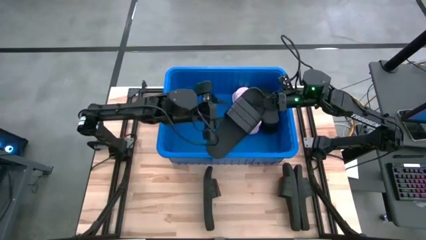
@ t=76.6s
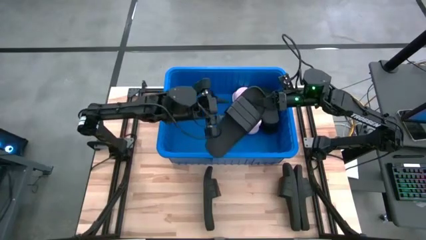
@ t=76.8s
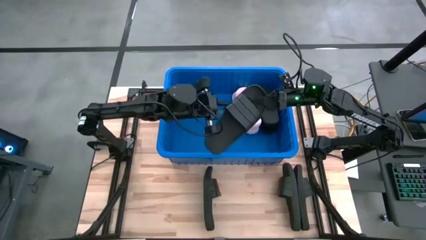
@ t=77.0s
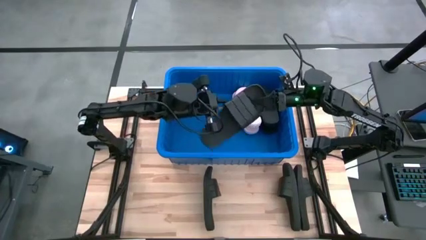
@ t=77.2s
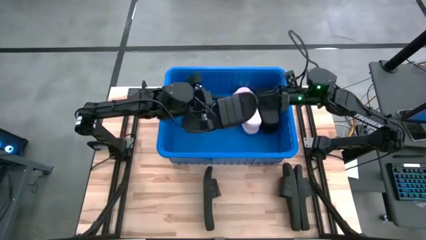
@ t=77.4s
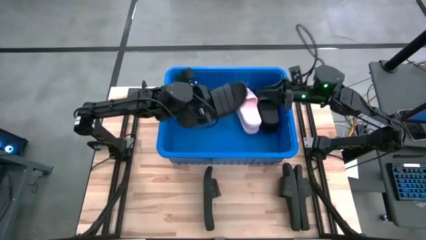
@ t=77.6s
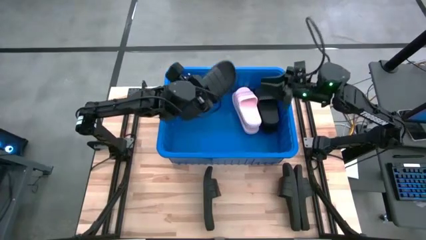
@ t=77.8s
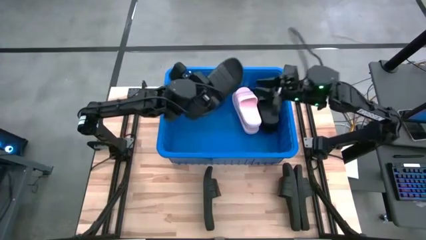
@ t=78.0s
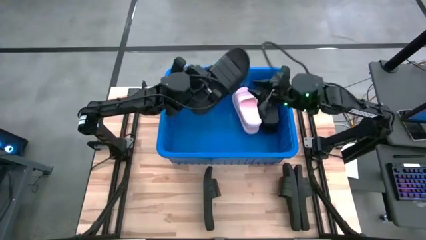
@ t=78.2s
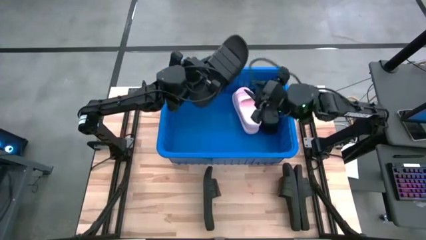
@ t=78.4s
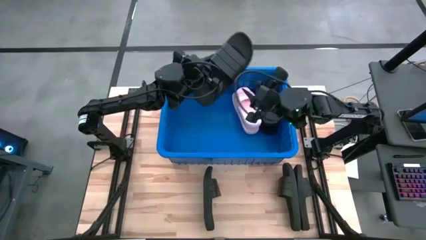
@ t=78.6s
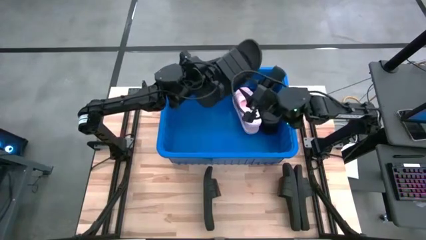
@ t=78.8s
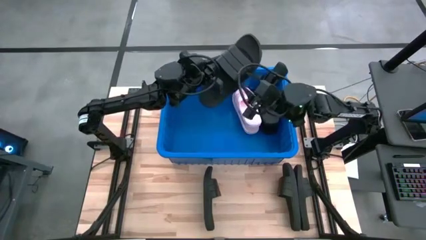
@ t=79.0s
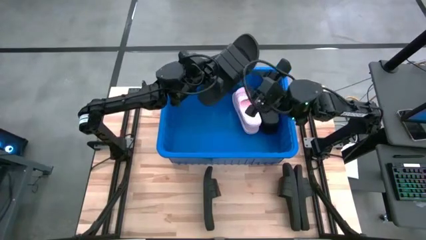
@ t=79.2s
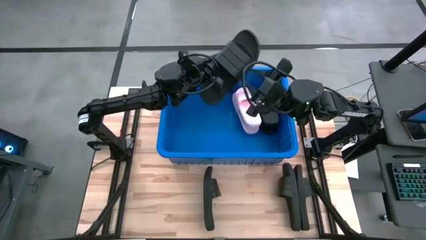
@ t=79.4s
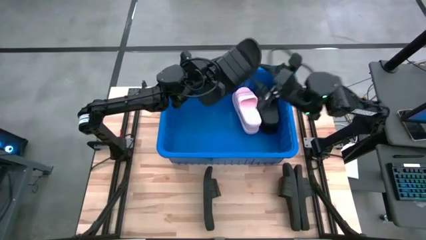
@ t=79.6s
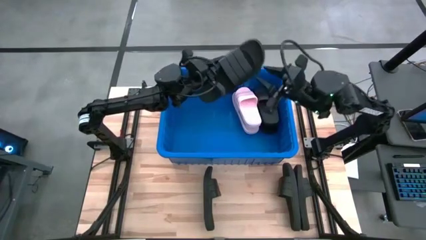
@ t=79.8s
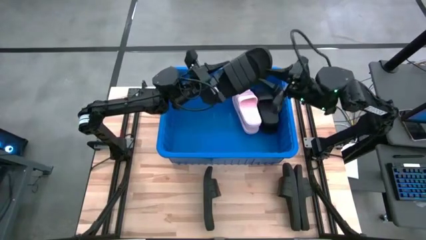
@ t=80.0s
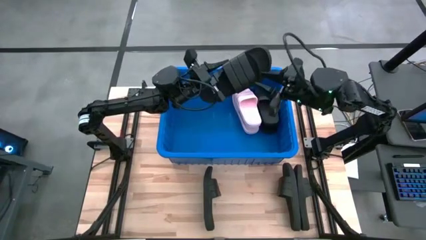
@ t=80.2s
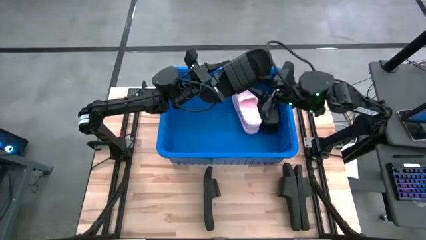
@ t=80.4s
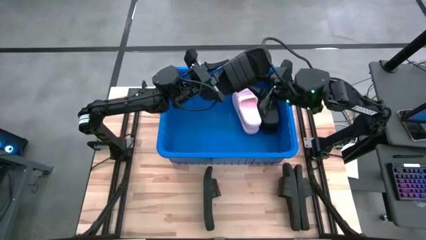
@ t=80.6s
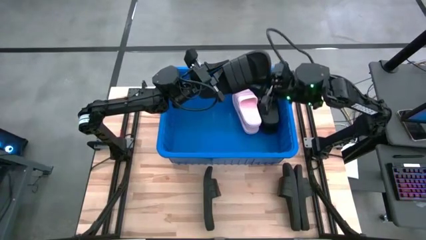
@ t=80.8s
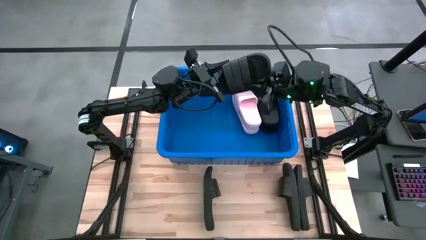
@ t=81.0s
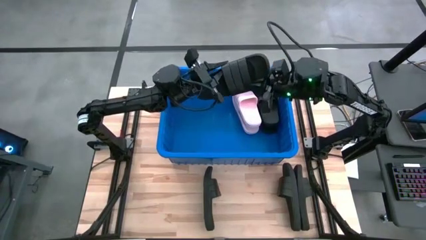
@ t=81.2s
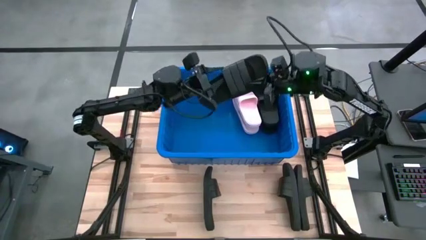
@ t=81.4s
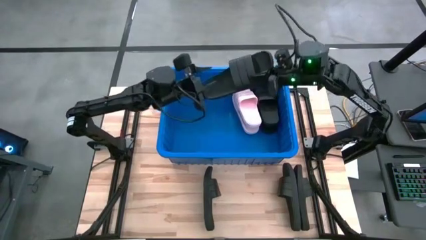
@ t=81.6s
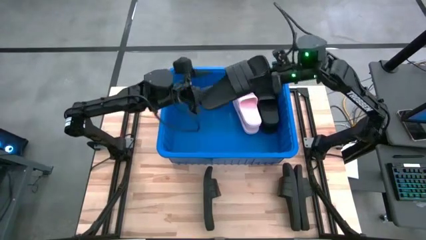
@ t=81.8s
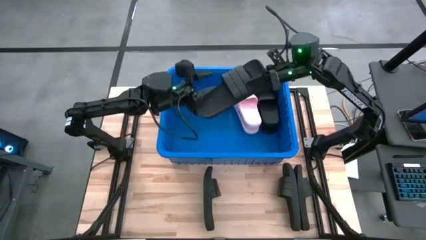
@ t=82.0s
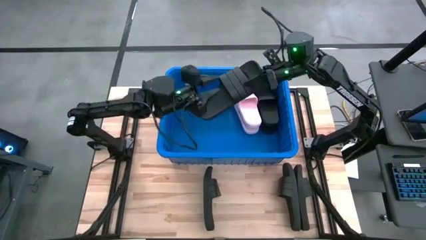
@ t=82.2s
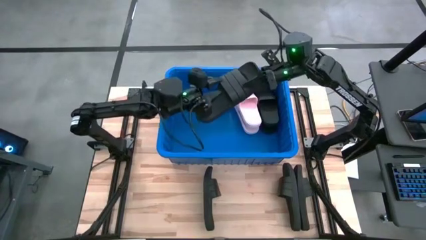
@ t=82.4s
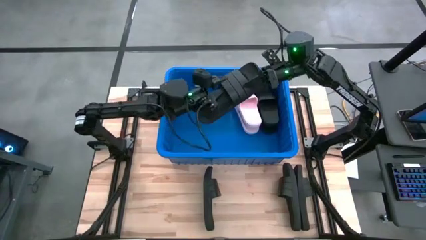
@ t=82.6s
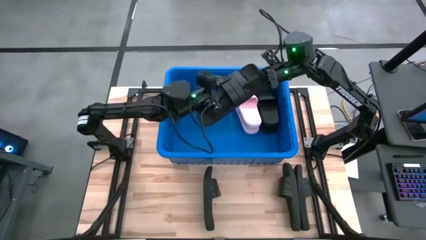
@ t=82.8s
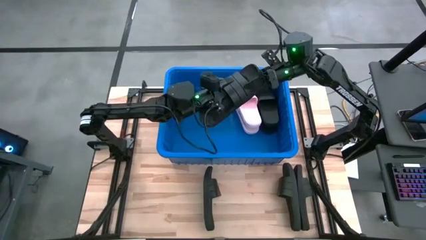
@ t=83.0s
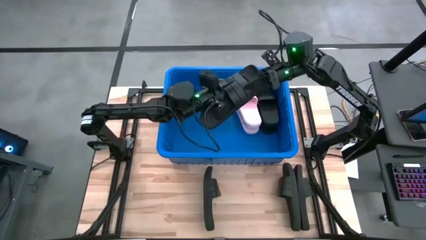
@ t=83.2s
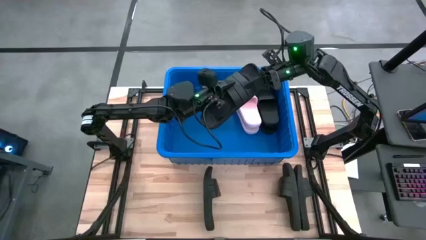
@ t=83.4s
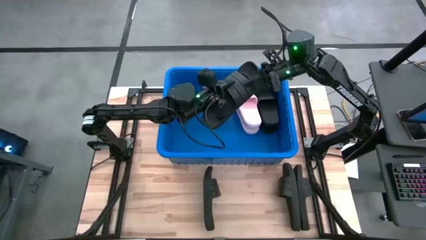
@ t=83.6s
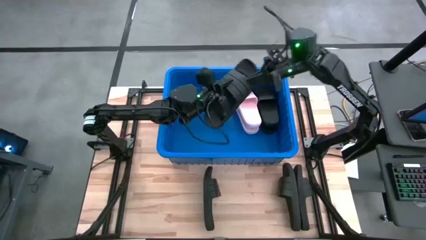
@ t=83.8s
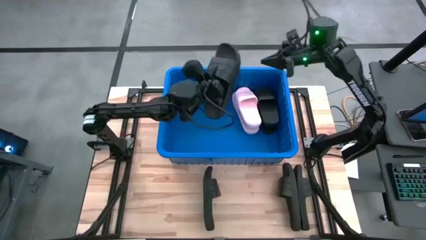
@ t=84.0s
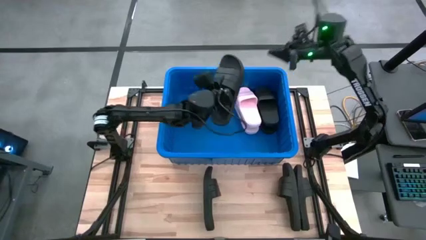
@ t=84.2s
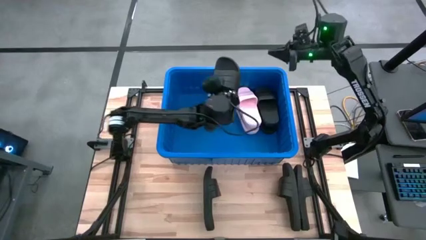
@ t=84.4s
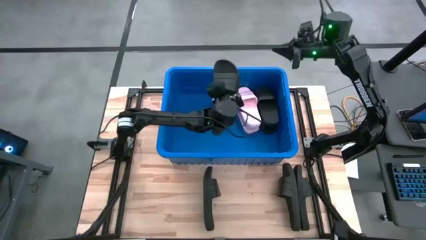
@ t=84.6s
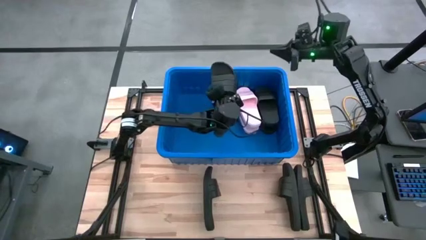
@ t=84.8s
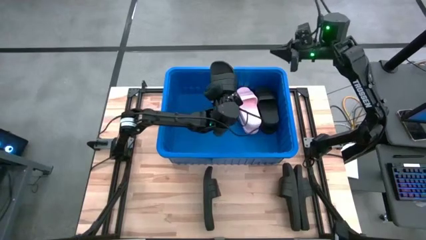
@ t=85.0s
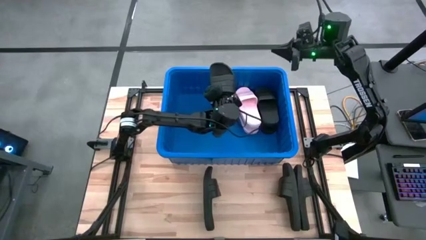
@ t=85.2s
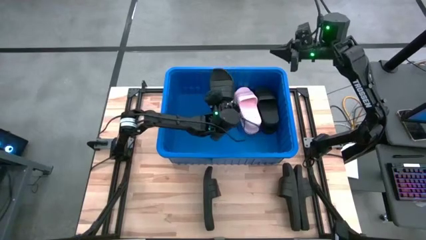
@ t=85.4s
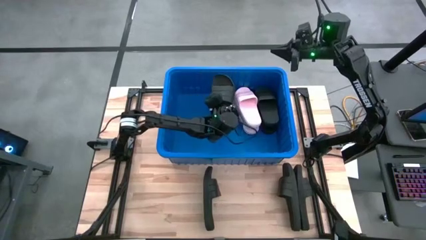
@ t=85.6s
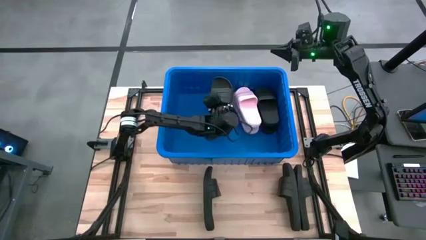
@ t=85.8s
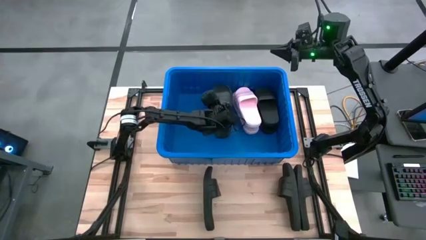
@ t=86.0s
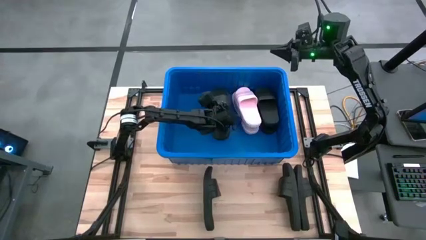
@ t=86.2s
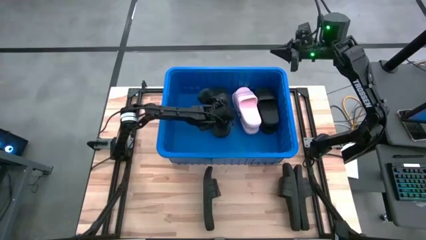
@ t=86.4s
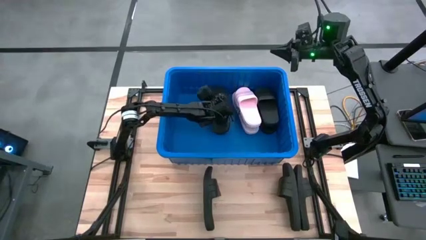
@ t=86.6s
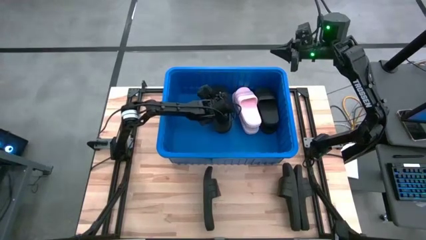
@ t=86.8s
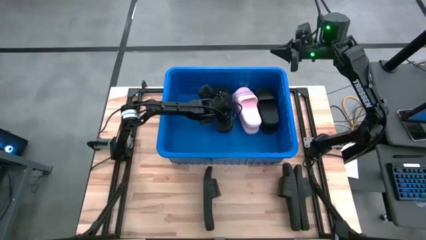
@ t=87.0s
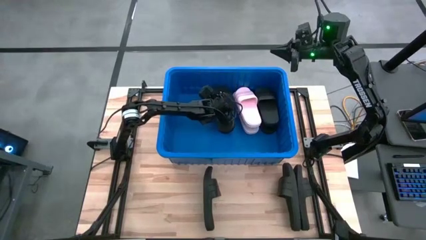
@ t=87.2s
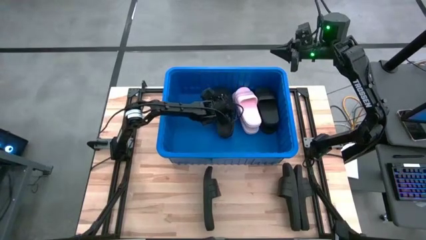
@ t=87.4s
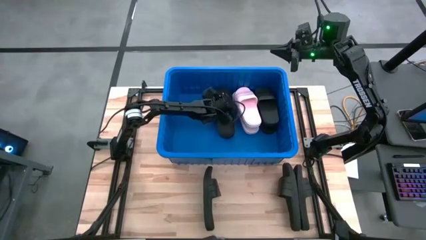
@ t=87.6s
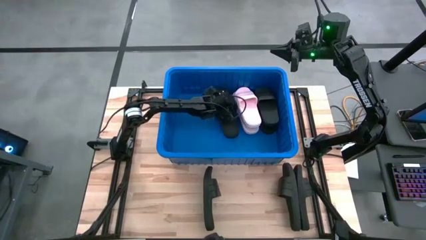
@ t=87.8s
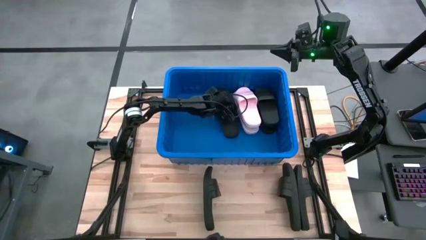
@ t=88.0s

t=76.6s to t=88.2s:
Task: Pick and place slides into bin
Put the black slide into the blue bin
